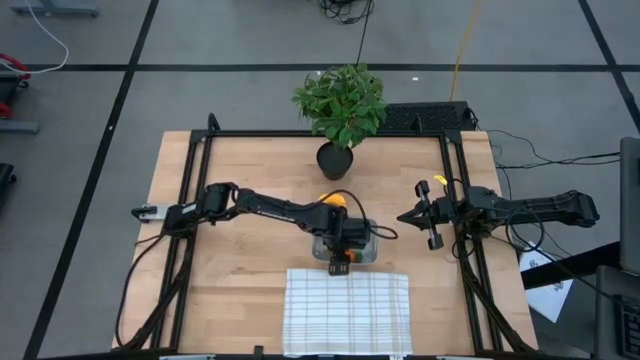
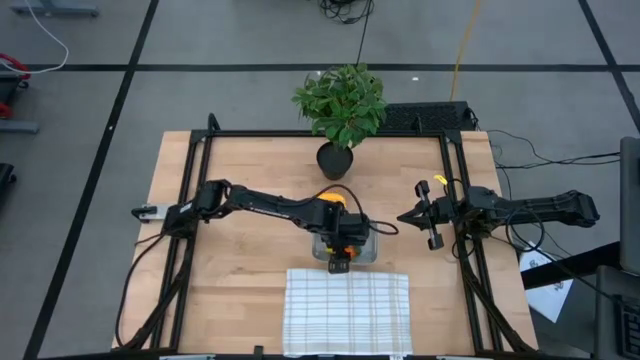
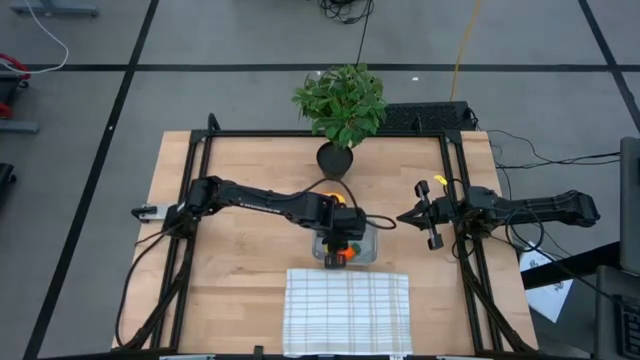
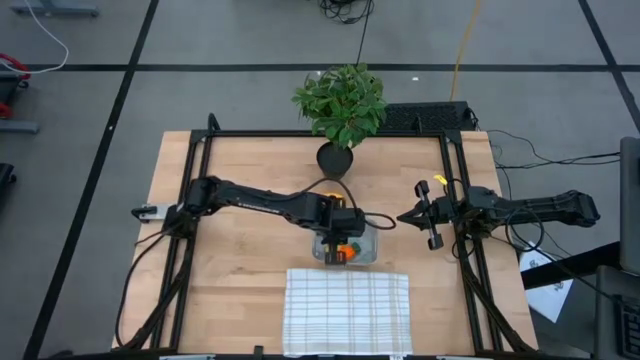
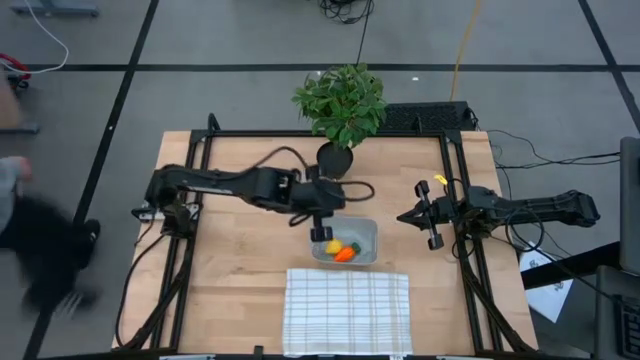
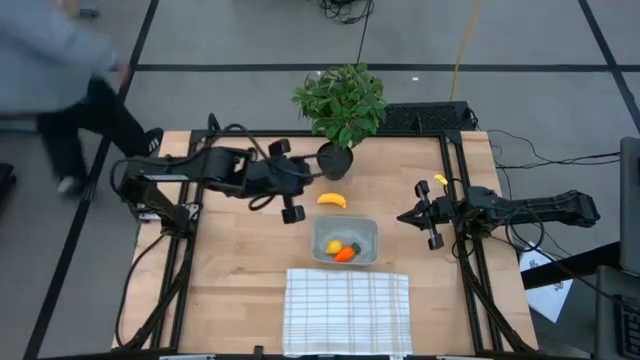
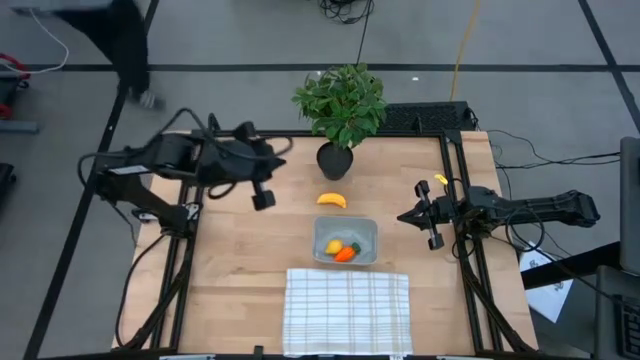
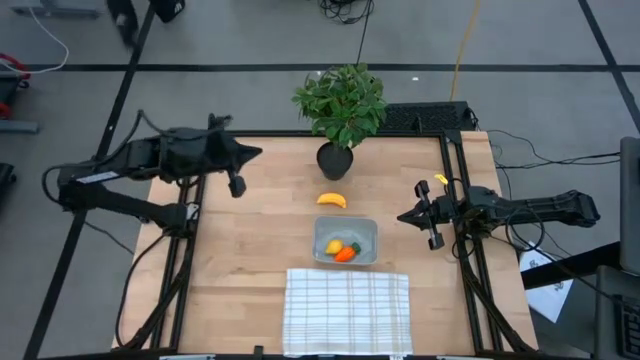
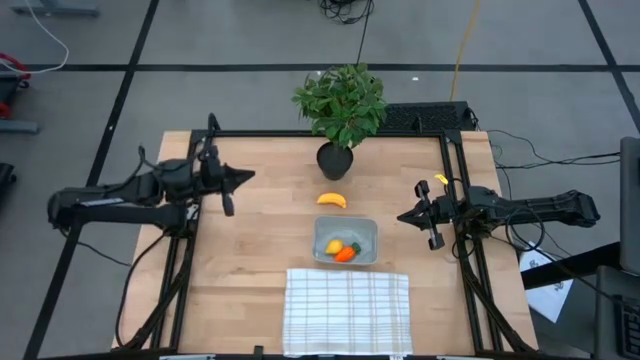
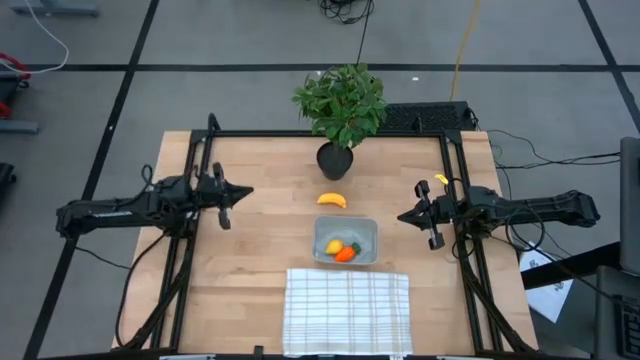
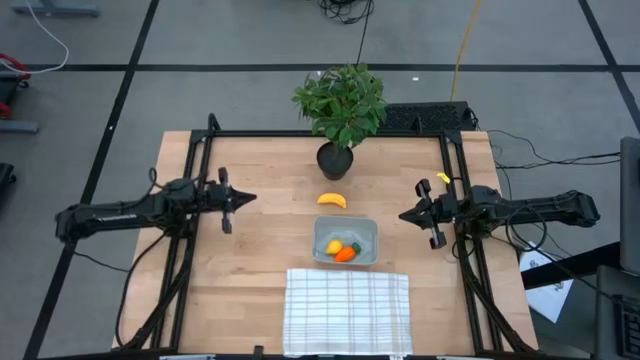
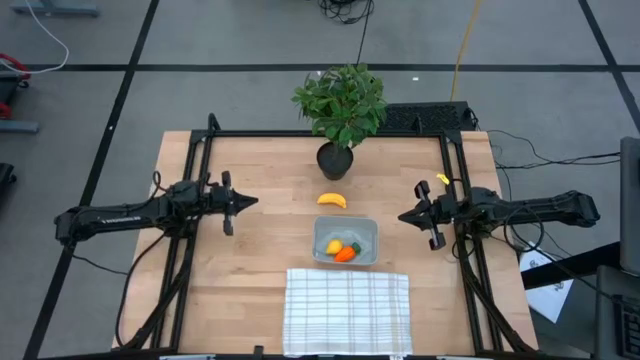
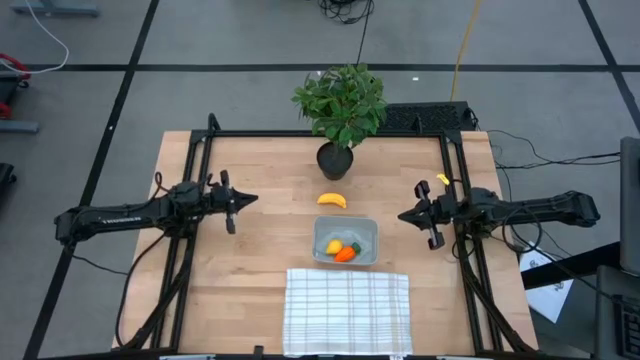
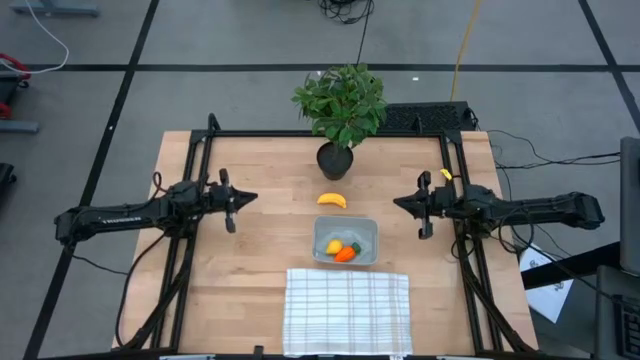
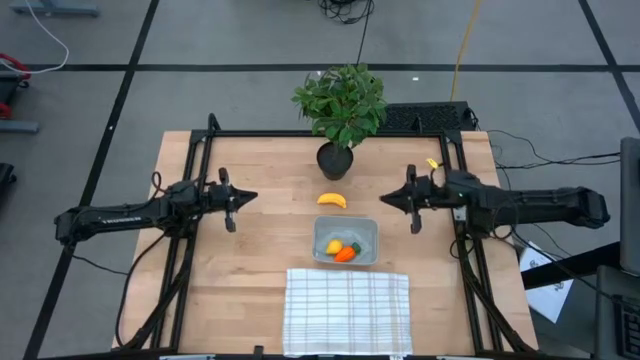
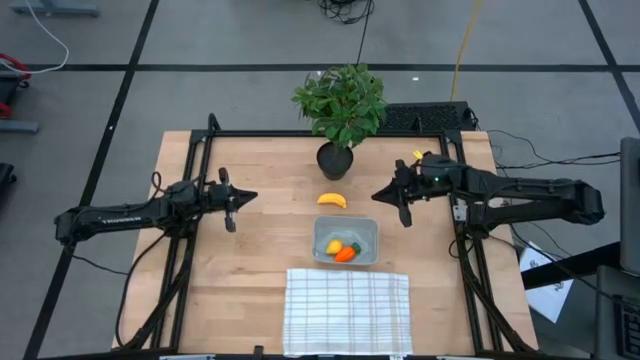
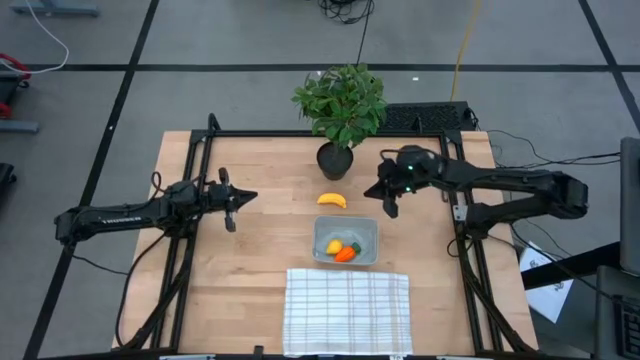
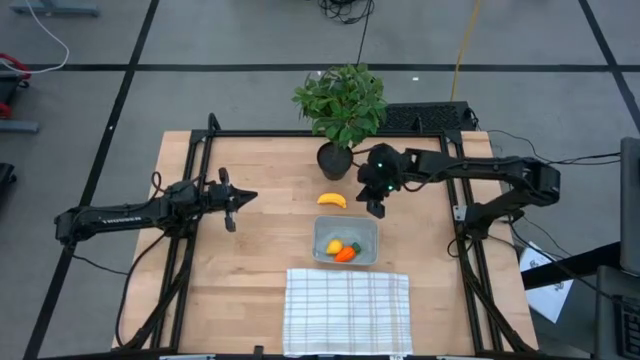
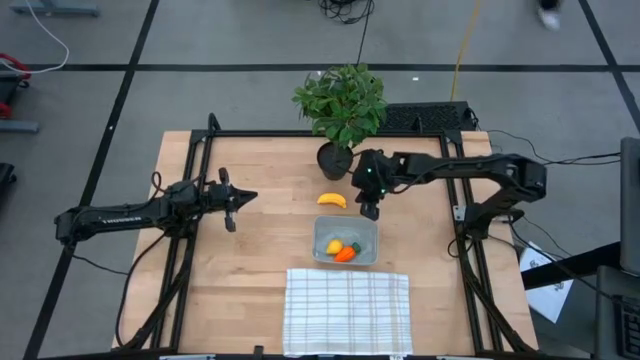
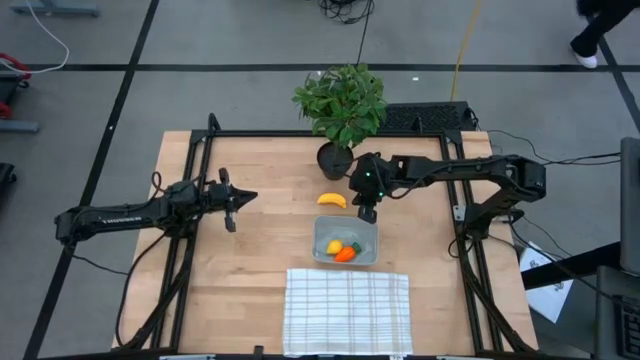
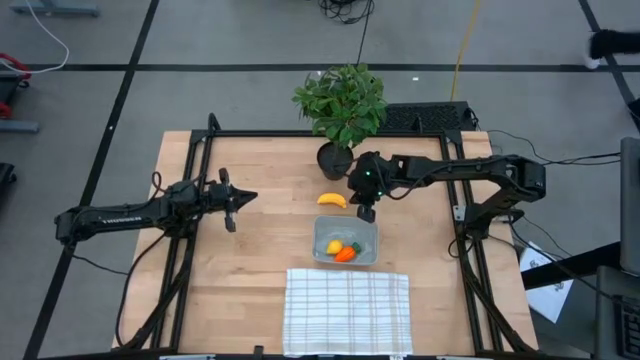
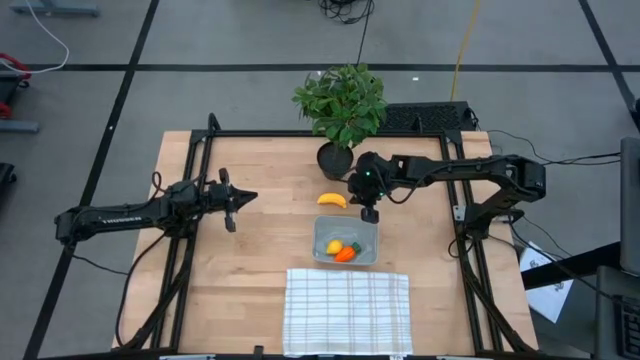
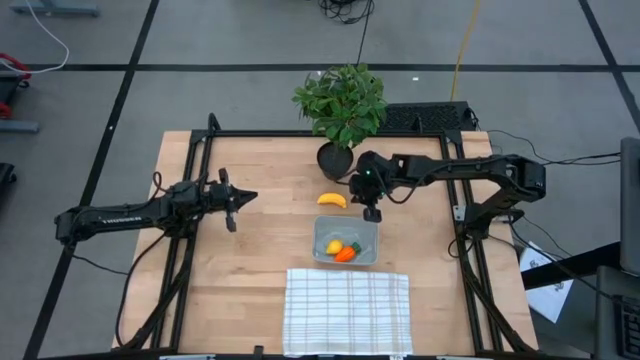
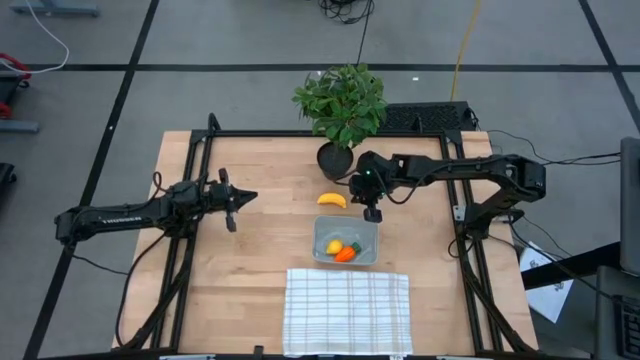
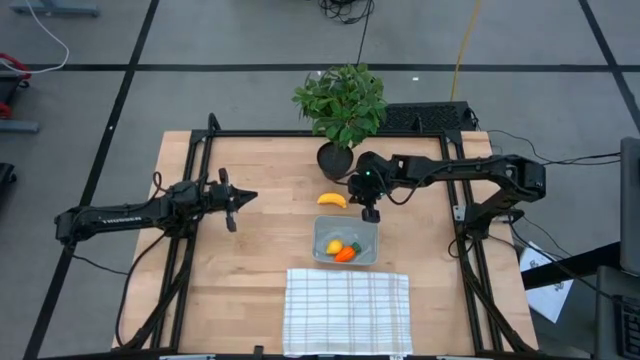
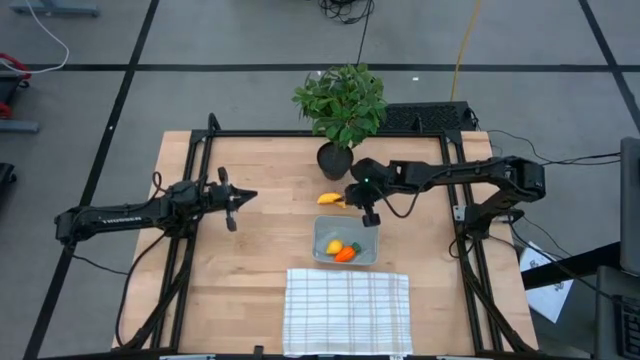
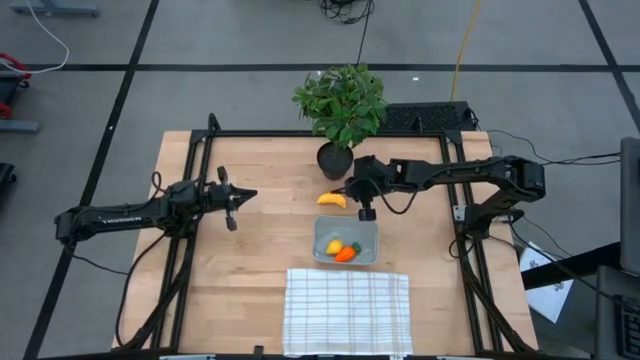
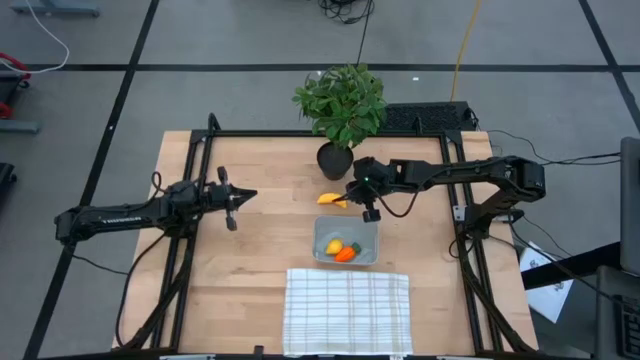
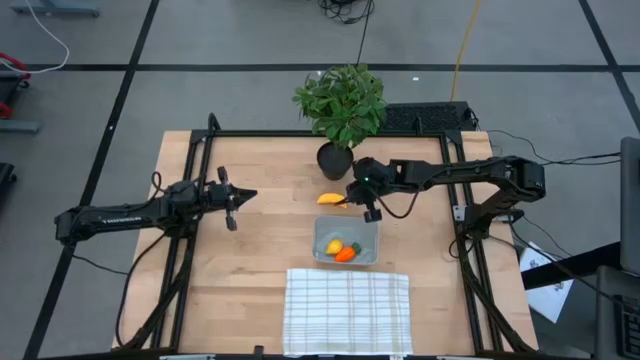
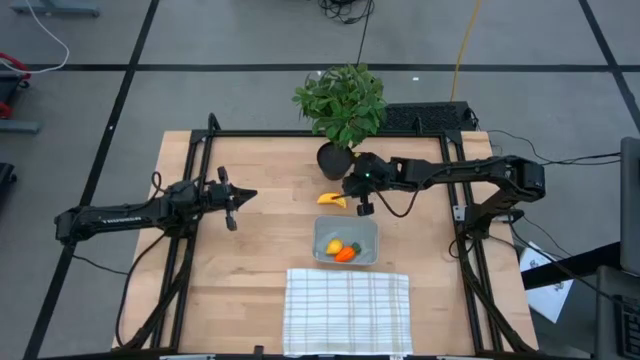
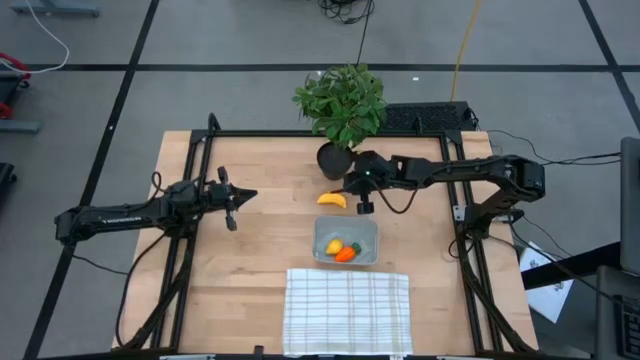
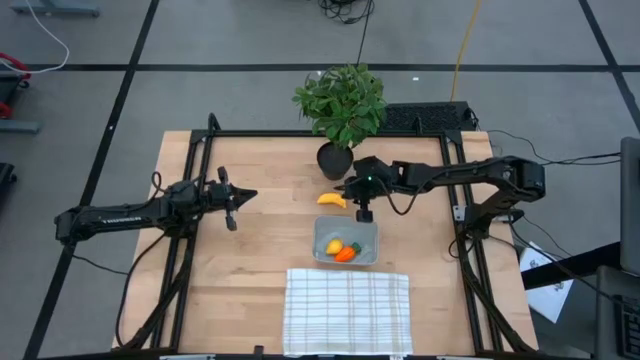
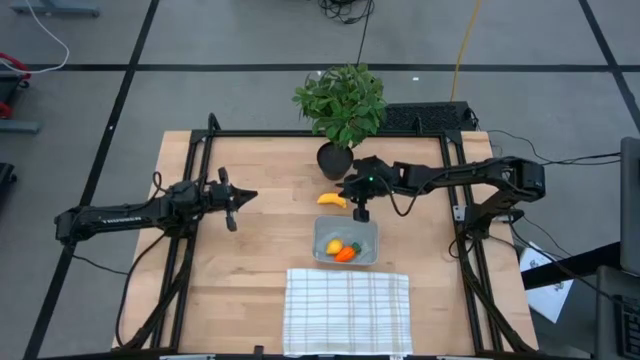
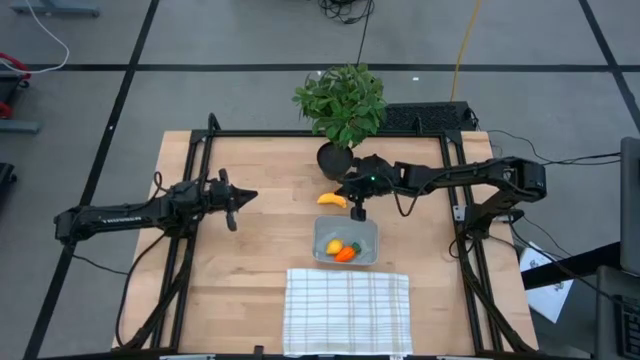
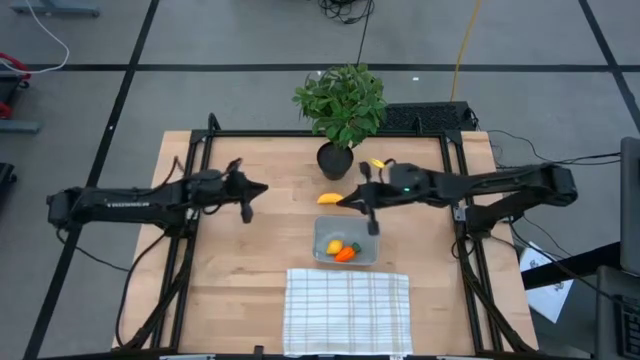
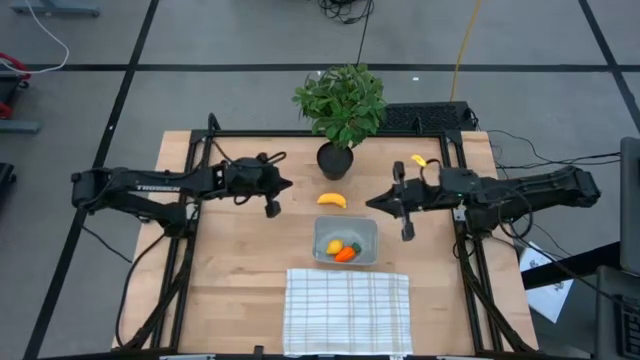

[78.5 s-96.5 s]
Task: Pick and placing Produce into tupperware
Put the yellow banana into the gray bin
